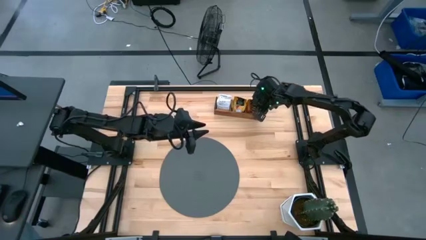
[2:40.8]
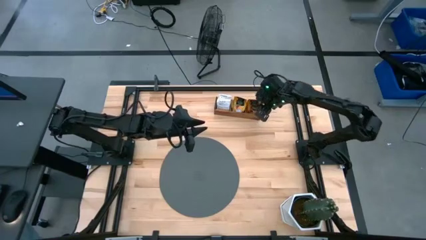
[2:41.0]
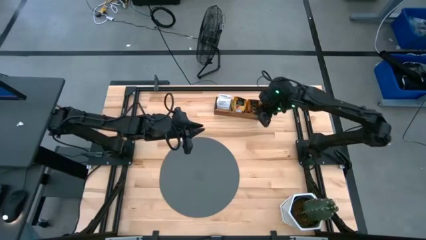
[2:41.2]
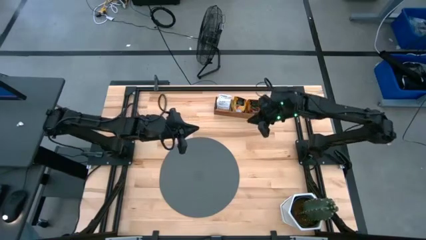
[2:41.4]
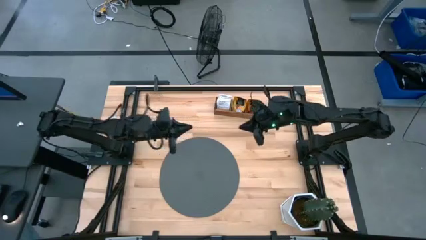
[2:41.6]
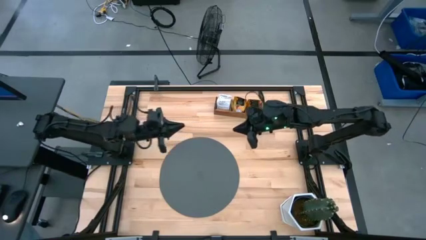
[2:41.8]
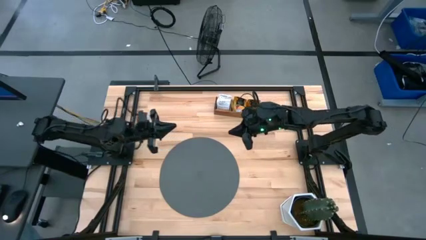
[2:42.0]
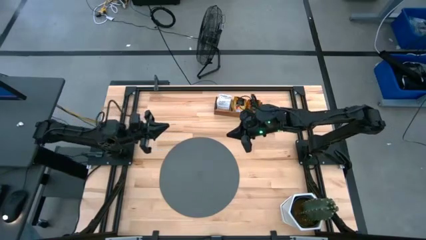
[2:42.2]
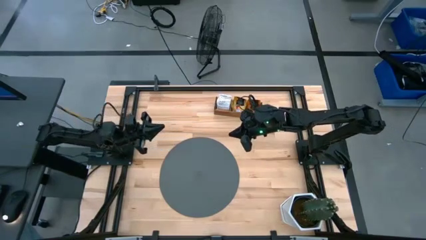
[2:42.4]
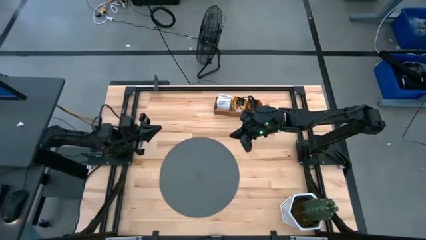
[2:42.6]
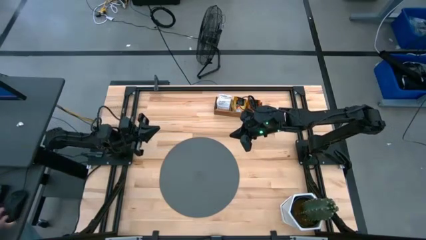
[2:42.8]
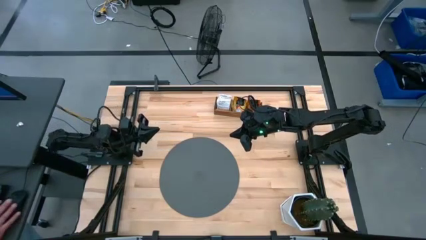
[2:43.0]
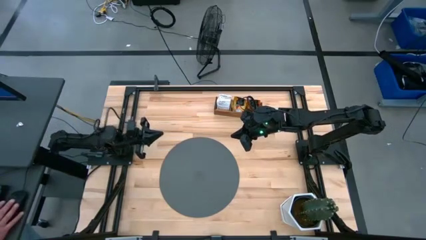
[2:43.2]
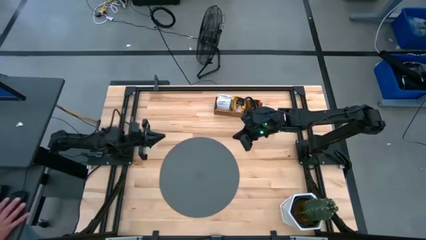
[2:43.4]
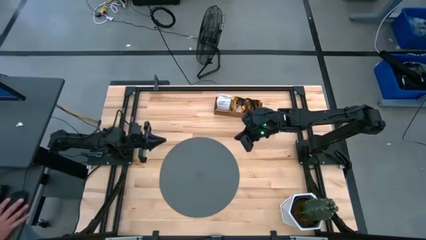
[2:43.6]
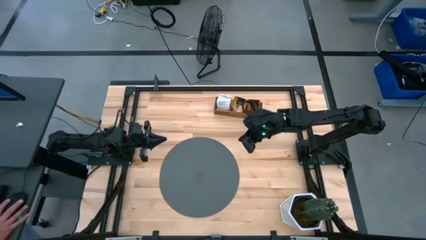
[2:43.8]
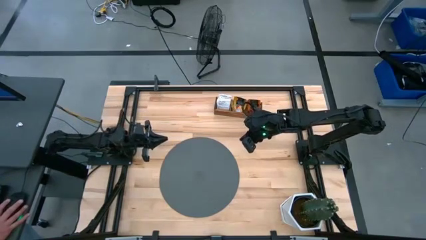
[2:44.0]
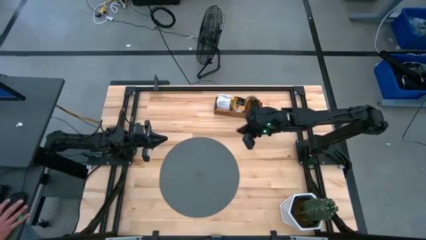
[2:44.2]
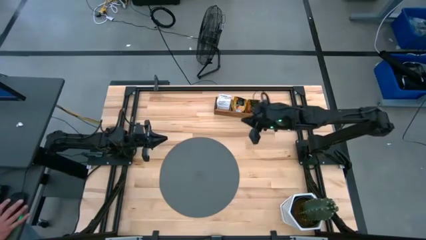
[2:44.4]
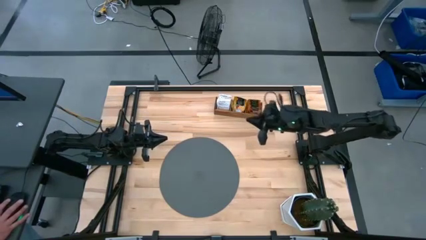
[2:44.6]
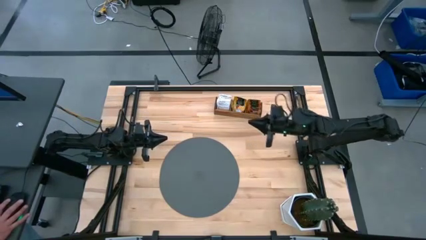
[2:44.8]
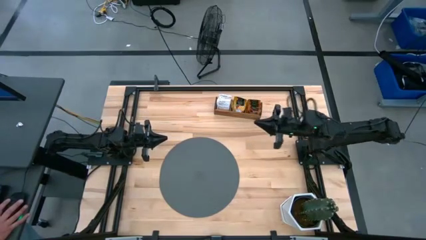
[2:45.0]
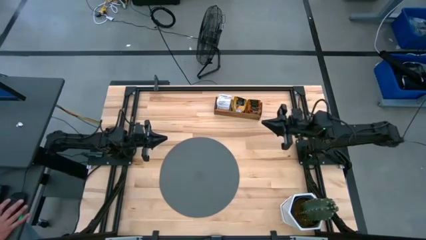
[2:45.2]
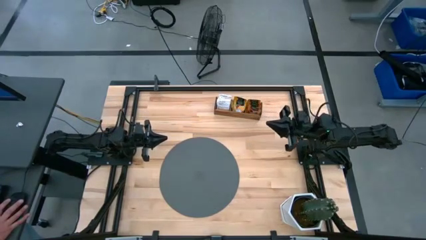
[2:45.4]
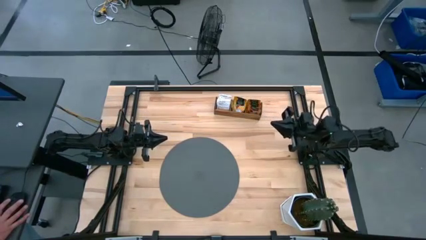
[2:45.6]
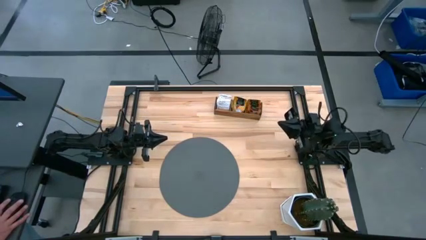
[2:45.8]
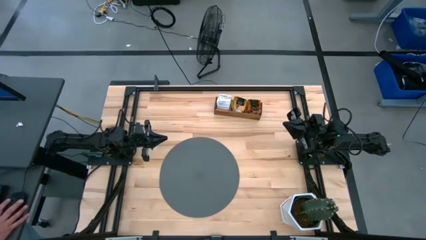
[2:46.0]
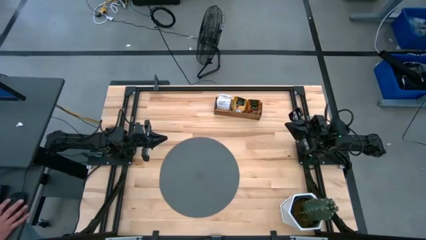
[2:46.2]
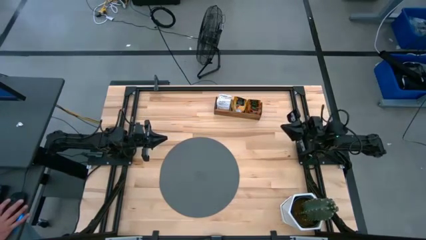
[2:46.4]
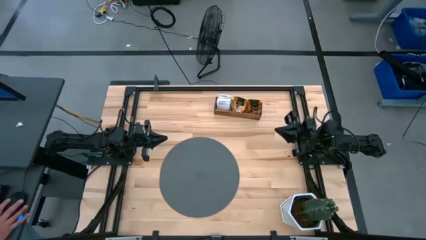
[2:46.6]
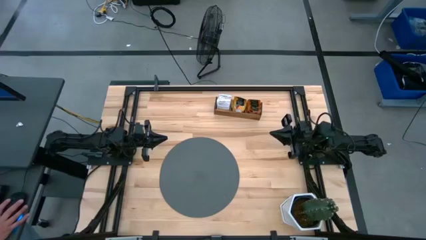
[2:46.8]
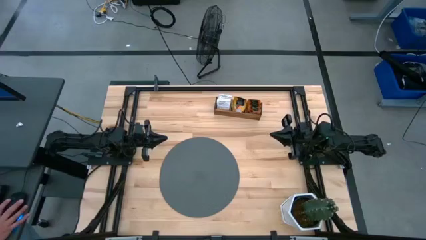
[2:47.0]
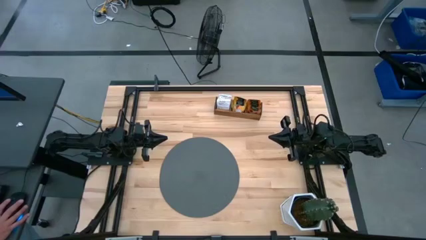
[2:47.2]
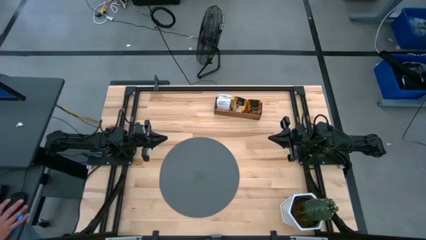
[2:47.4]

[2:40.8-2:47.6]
Task: Pick & Place Tea
Return to Home Position

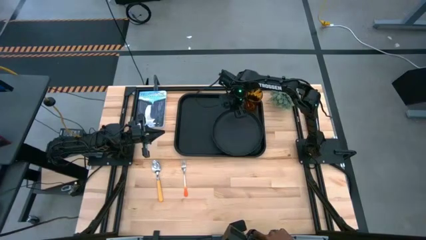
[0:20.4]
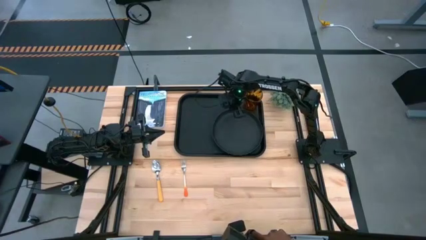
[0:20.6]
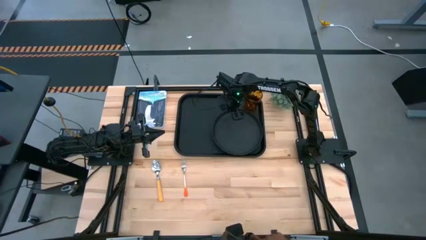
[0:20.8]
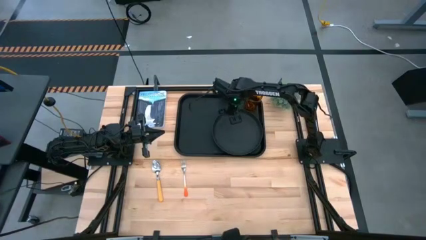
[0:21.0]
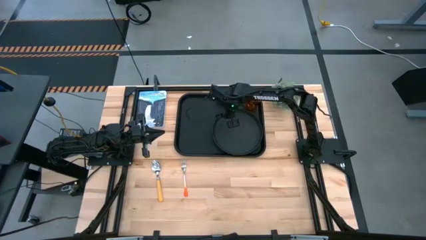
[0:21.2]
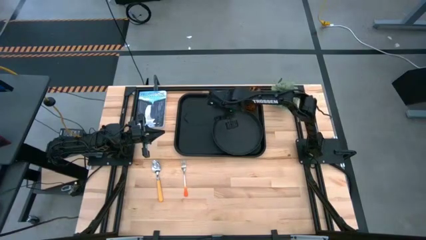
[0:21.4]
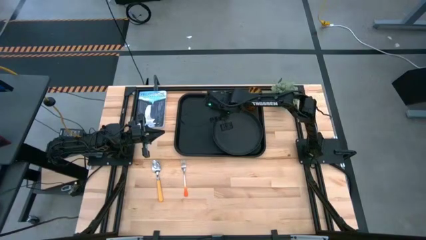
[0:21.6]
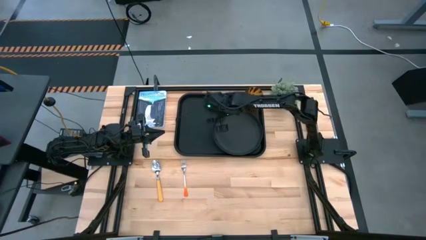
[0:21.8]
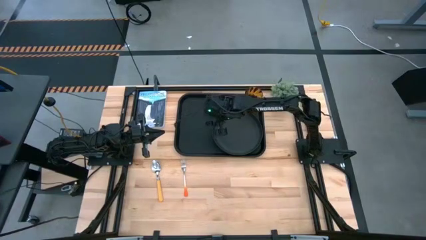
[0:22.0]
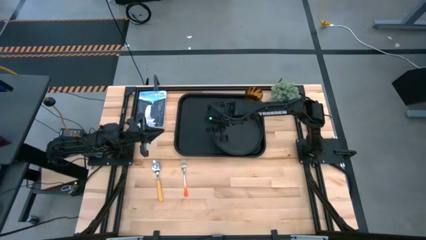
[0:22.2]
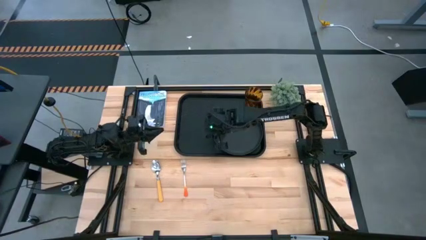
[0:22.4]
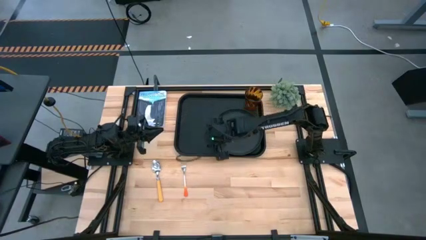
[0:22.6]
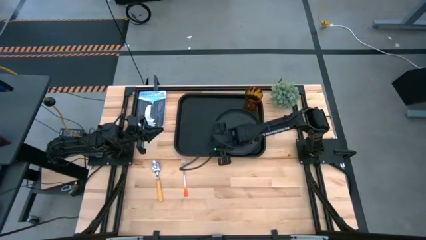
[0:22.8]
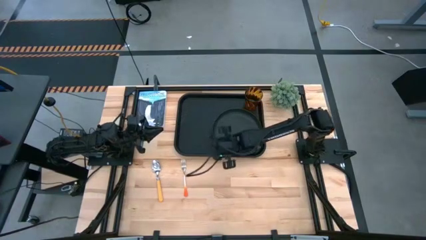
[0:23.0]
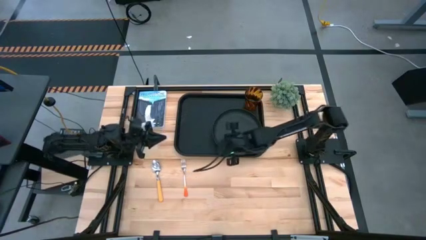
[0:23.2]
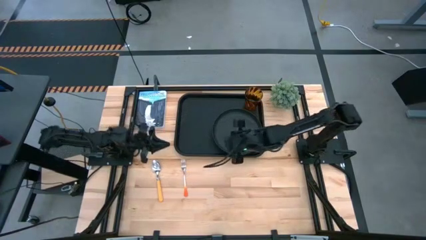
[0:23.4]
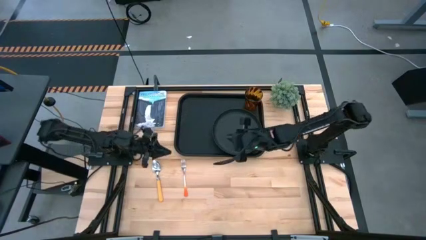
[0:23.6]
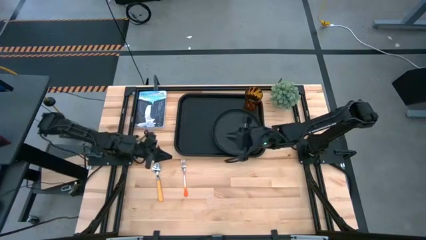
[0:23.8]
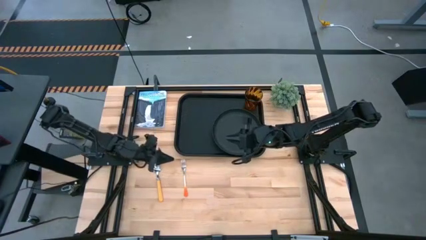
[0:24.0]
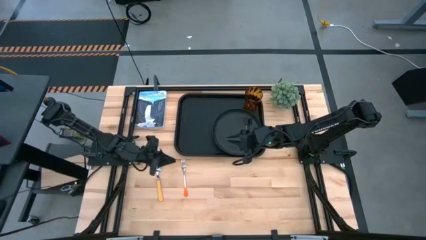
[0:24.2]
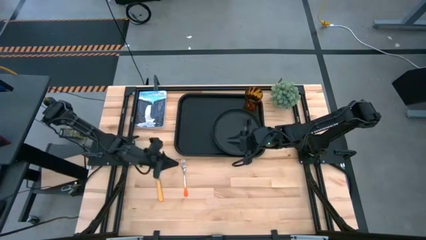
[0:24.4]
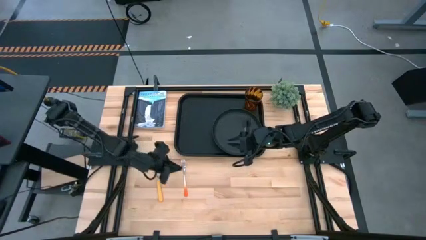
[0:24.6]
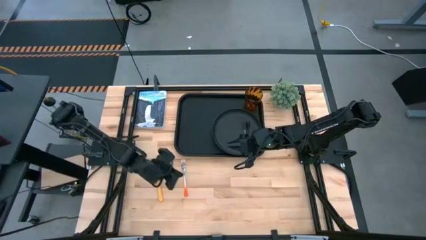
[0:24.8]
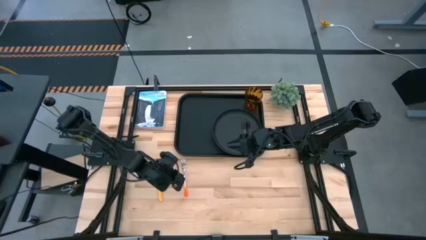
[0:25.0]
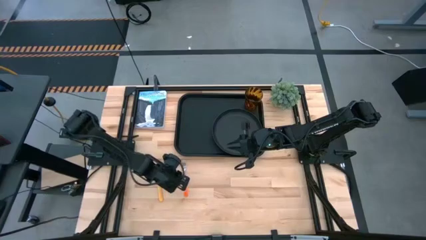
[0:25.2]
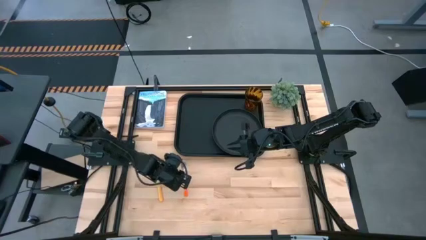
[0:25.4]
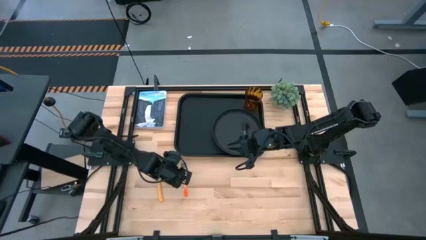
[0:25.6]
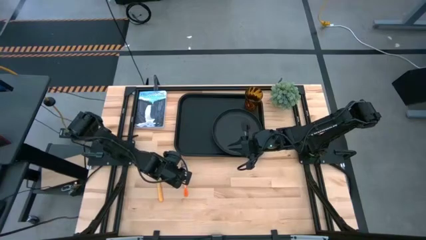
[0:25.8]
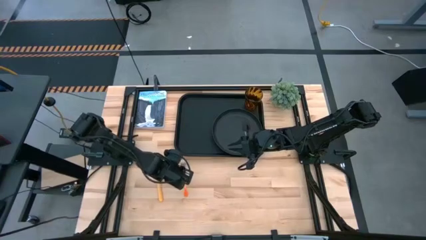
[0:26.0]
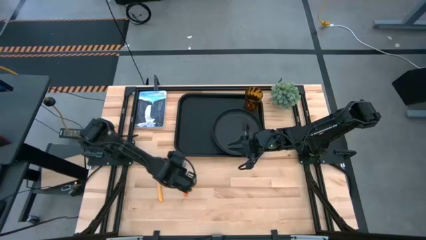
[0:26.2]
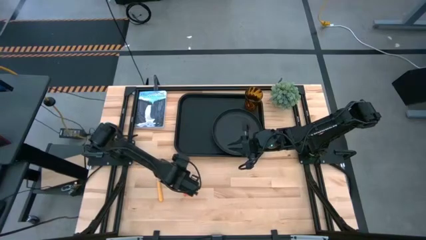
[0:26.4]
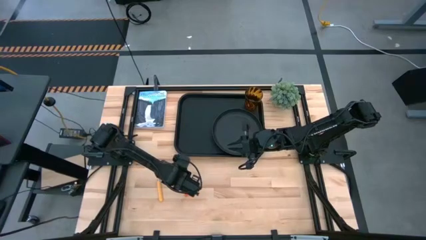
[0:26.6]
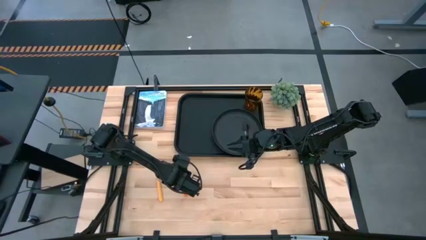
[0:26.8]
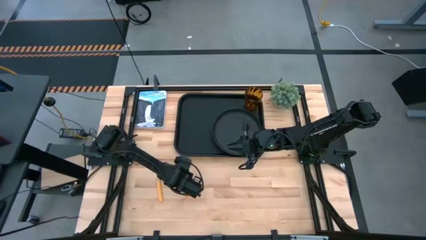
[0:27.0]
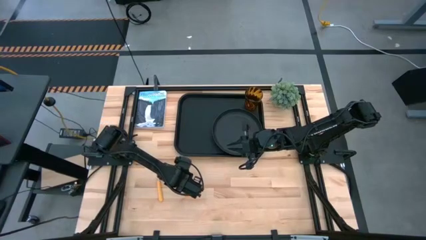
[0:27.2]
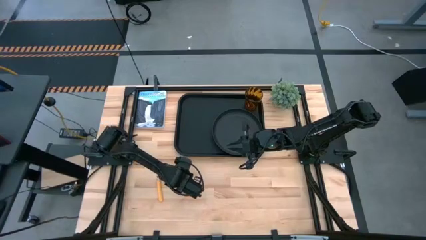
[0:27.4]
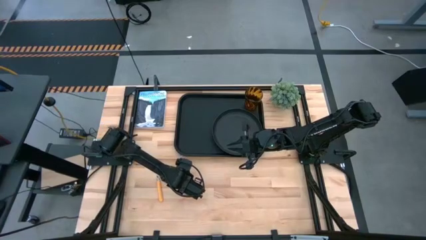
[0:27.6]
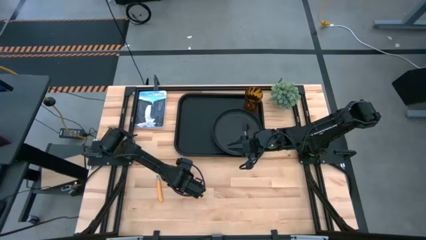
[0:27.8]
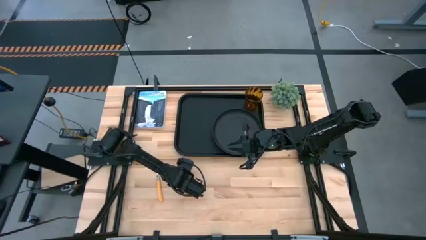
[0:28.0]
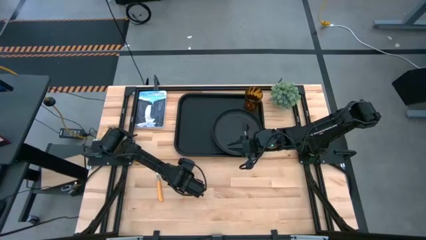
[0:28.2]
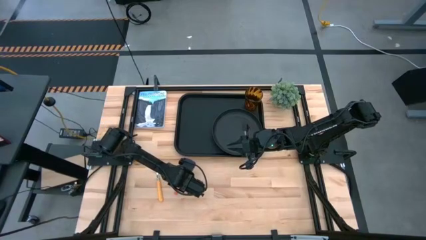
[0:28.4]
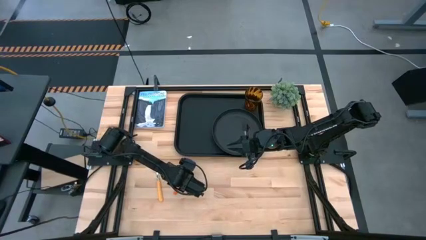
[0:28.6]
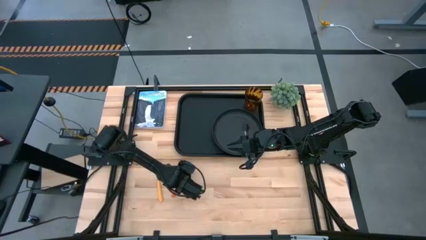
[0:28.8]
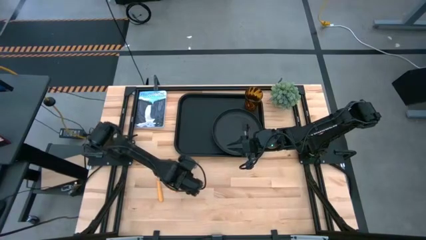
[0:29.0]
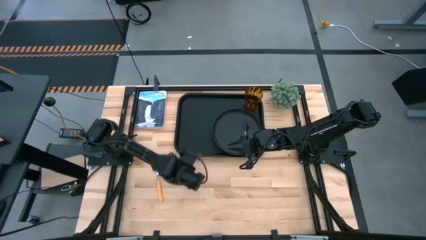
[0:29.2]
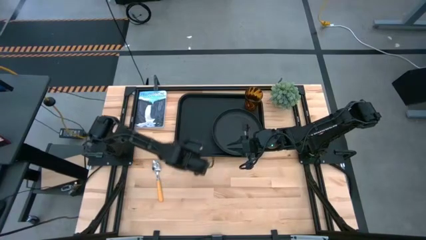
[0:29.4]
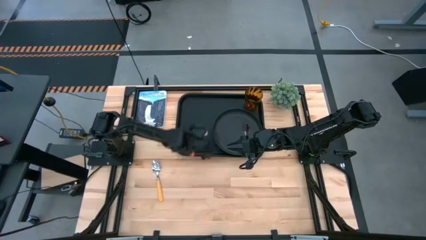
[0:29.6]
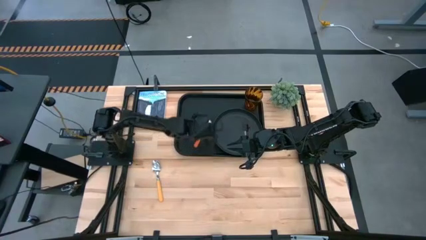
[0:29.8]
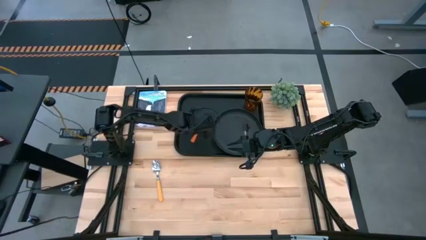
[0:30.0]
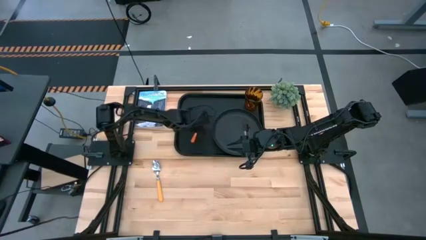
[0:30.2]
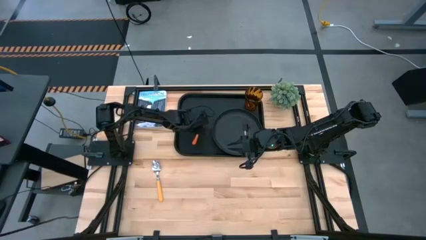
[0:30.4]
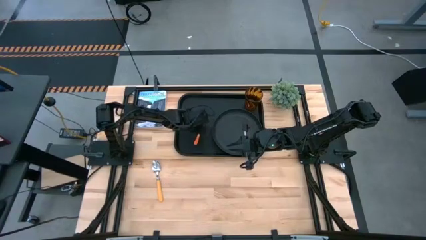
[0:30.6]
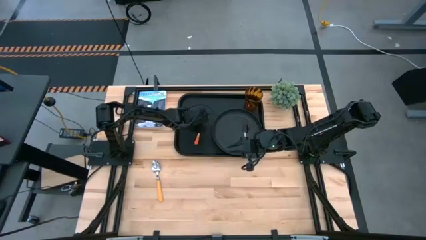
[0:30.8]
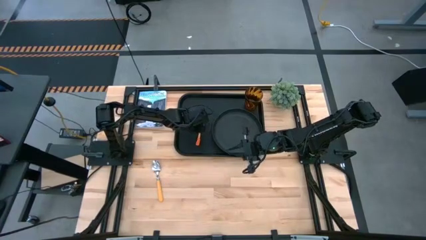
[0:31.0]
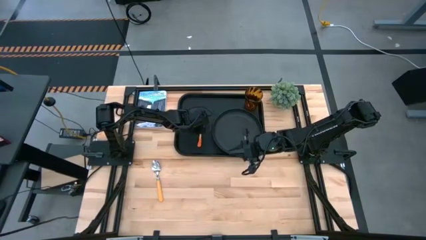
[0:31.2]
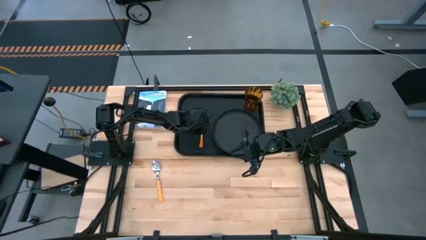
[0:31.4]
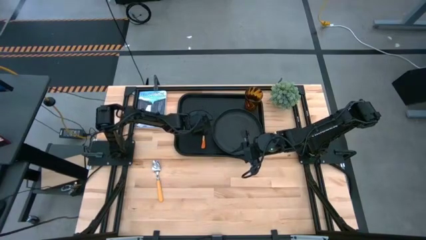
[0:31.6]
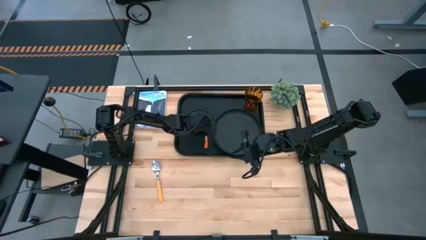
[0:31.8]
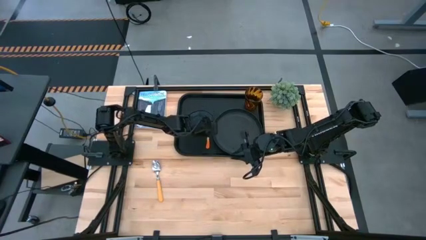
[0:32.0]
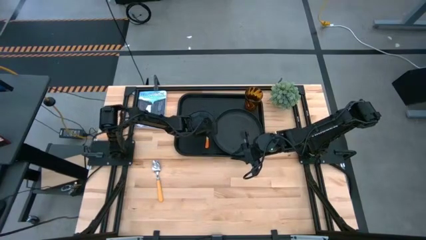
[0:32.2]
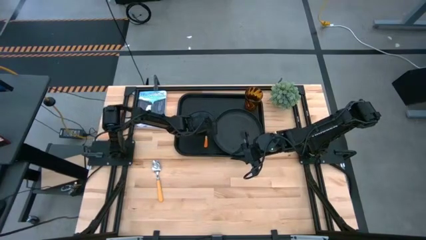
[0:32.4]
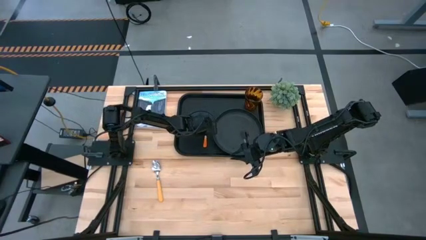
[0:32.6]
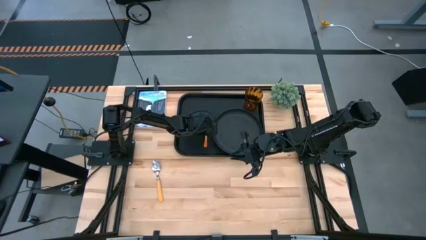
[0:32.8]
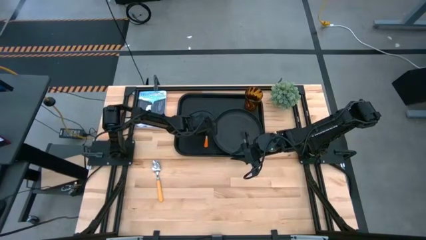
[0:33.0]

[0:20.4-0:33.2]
Task: Pick and place plate/cup/fork/spoon on tray
Put the orange fork on the black tray to the left of the black plate
